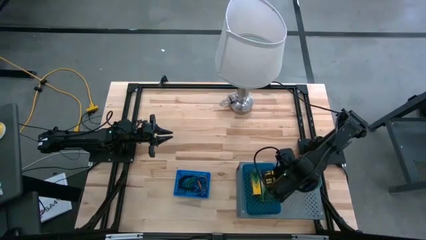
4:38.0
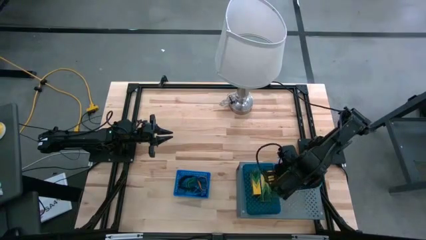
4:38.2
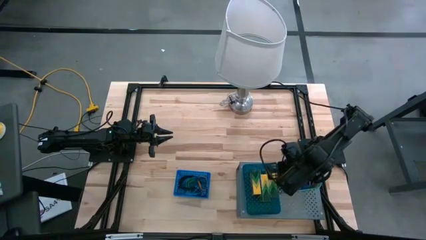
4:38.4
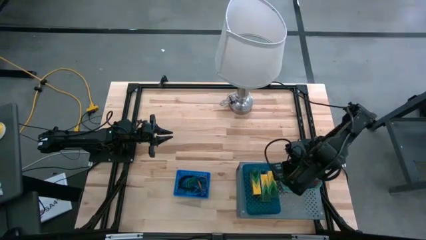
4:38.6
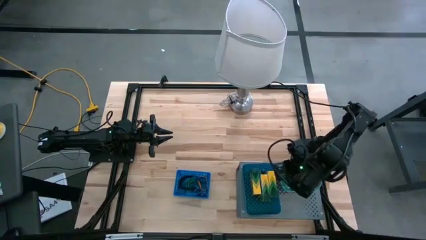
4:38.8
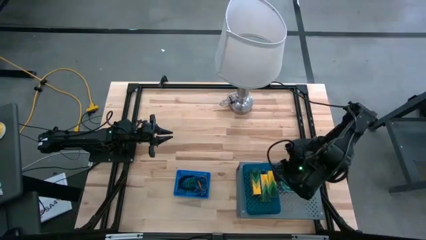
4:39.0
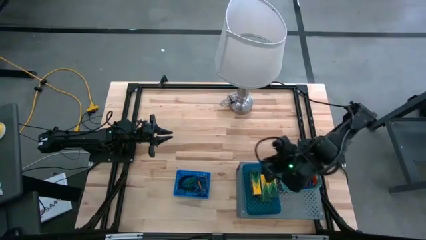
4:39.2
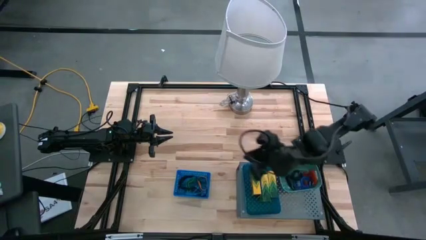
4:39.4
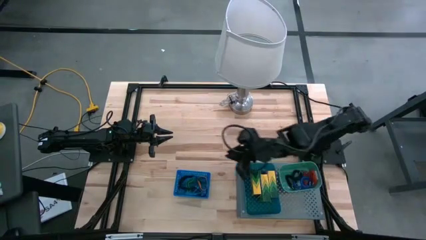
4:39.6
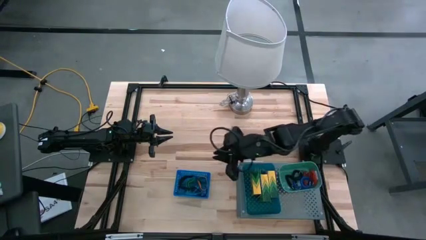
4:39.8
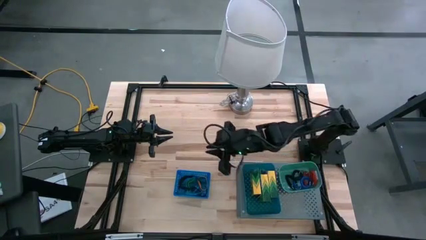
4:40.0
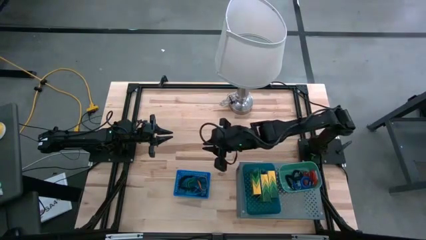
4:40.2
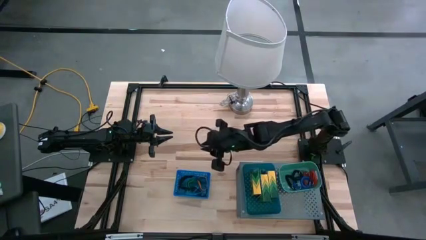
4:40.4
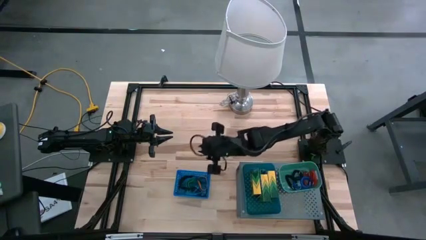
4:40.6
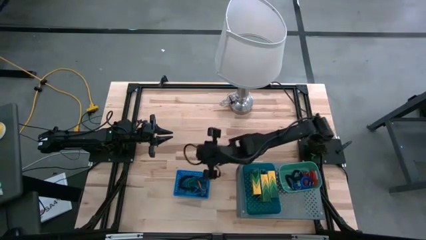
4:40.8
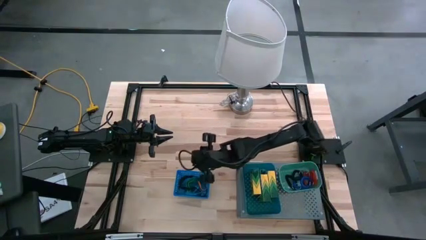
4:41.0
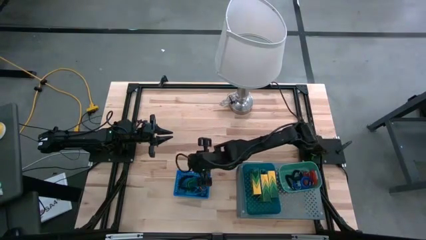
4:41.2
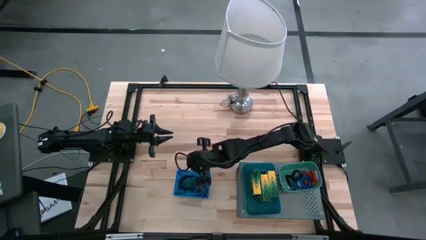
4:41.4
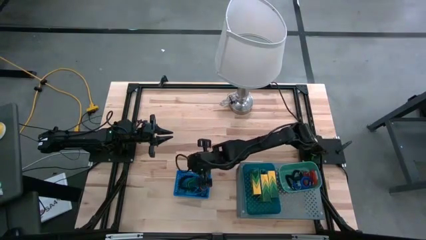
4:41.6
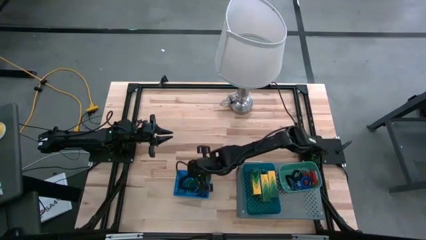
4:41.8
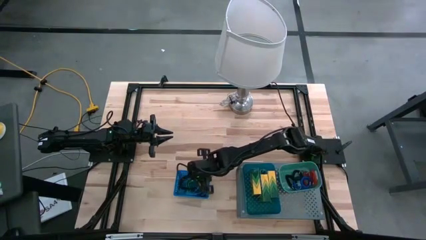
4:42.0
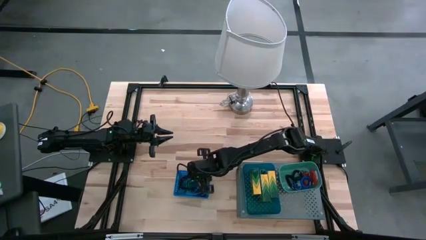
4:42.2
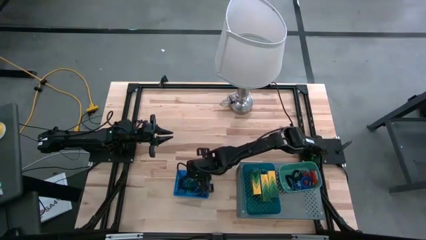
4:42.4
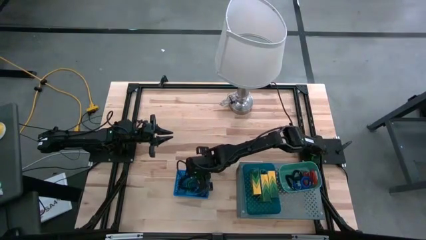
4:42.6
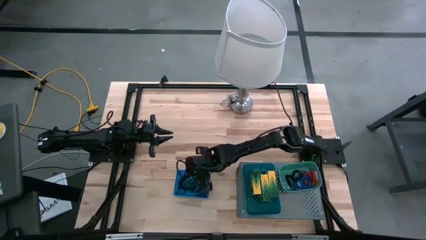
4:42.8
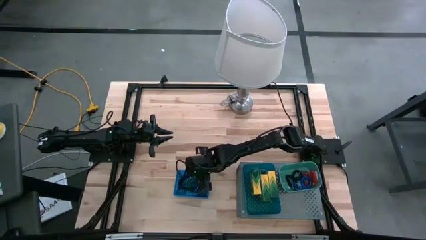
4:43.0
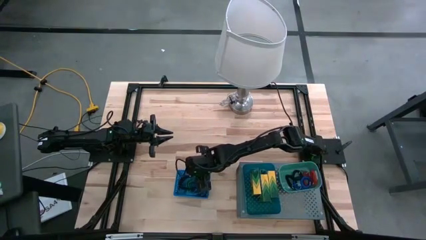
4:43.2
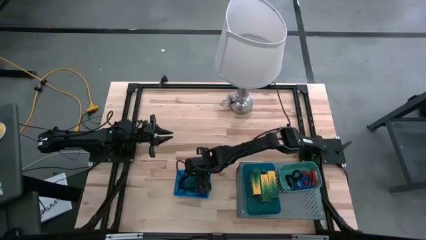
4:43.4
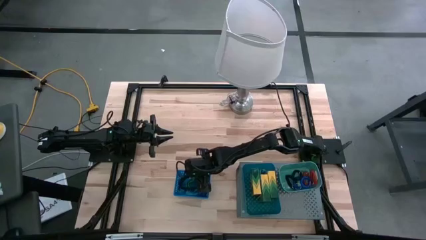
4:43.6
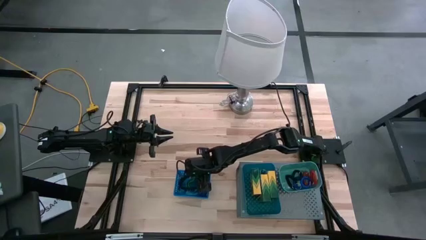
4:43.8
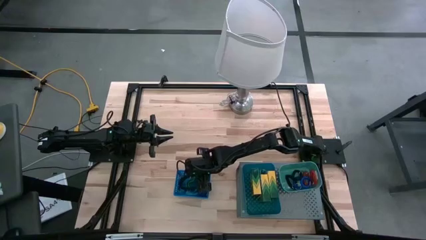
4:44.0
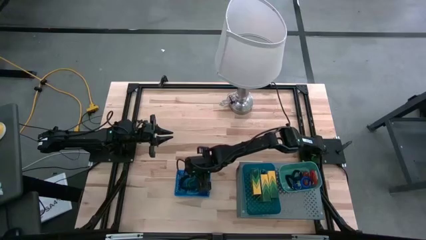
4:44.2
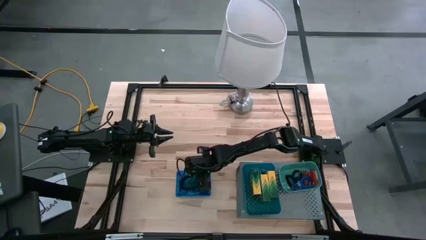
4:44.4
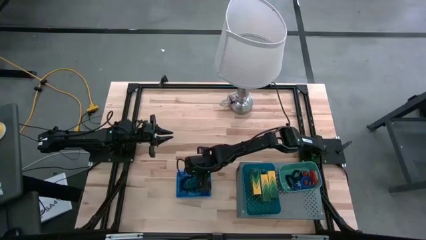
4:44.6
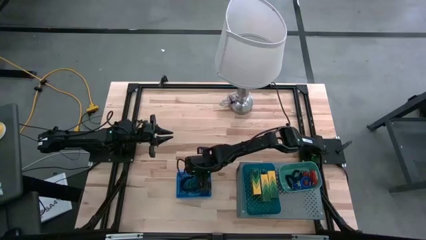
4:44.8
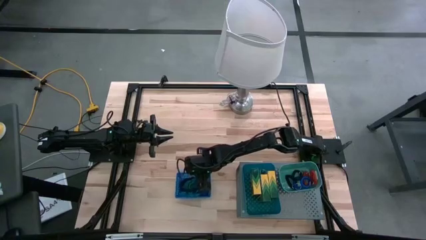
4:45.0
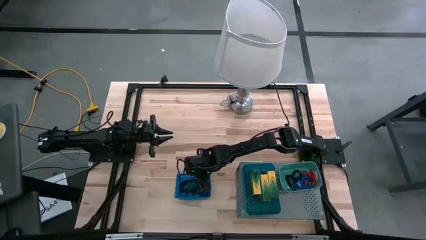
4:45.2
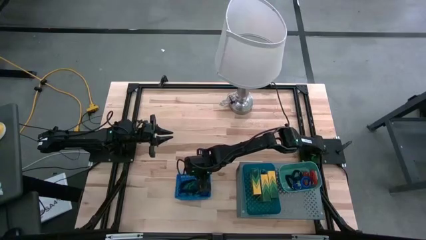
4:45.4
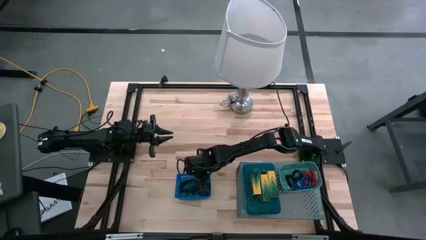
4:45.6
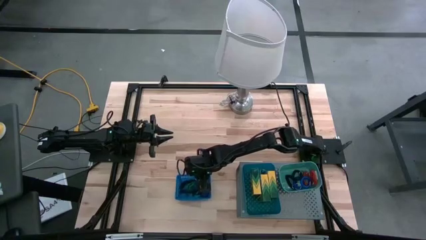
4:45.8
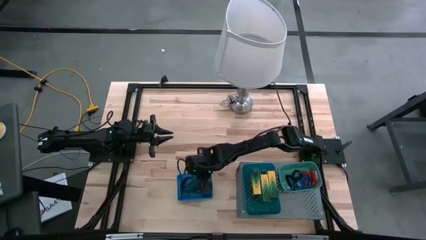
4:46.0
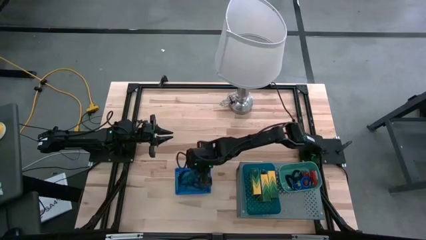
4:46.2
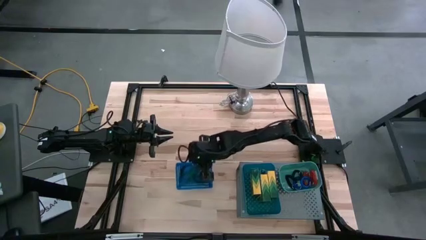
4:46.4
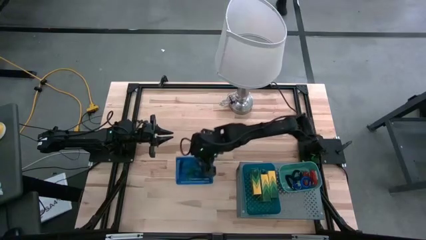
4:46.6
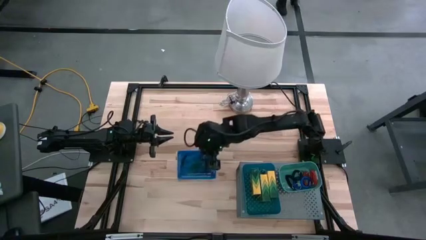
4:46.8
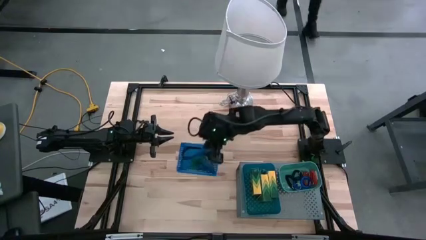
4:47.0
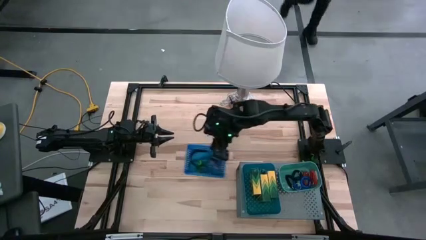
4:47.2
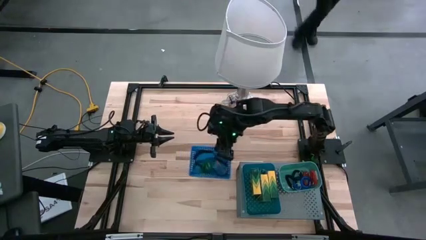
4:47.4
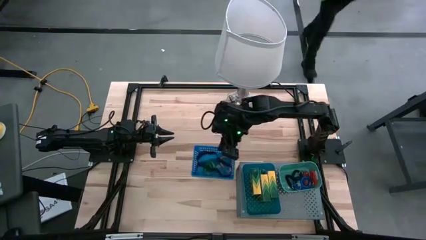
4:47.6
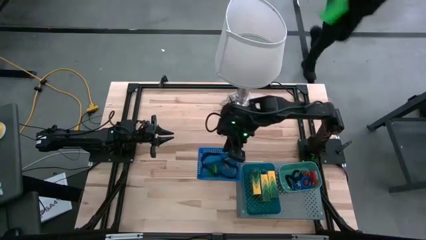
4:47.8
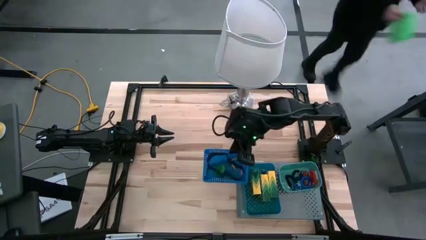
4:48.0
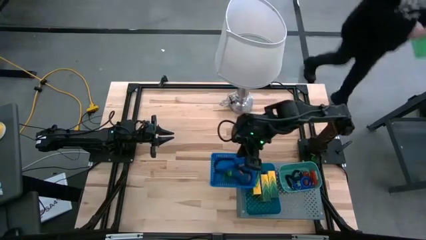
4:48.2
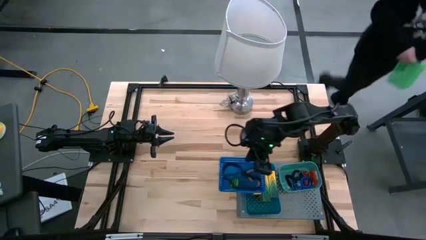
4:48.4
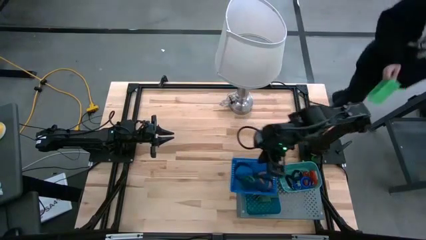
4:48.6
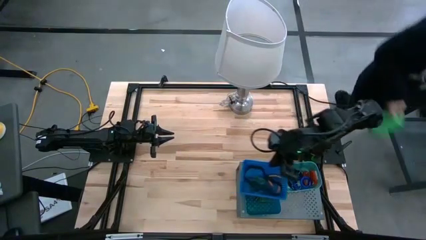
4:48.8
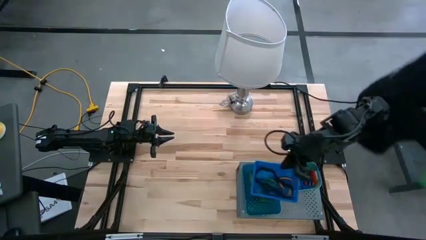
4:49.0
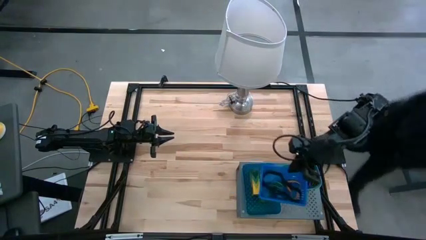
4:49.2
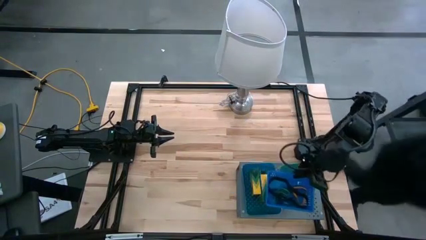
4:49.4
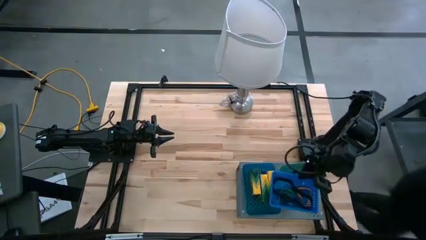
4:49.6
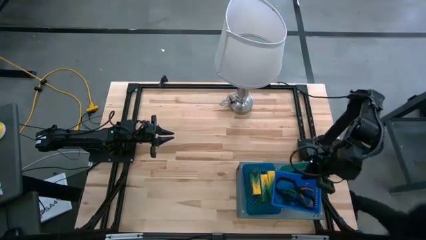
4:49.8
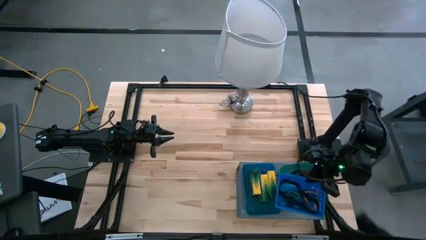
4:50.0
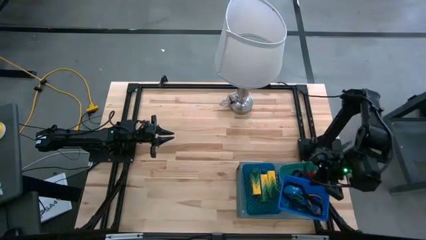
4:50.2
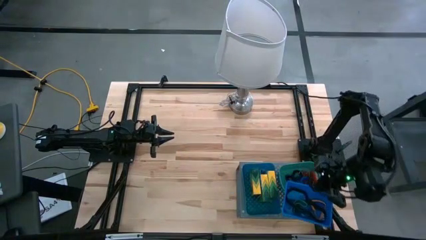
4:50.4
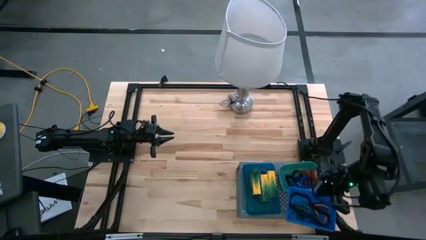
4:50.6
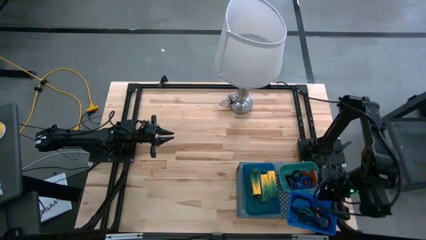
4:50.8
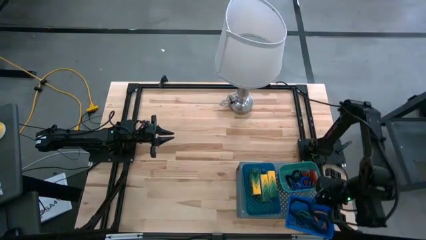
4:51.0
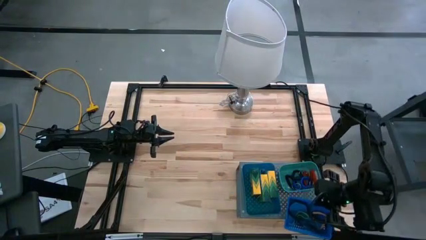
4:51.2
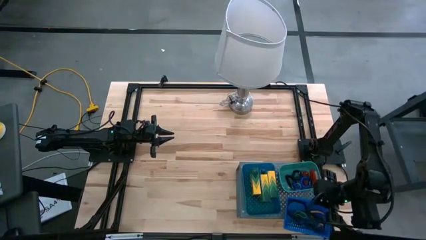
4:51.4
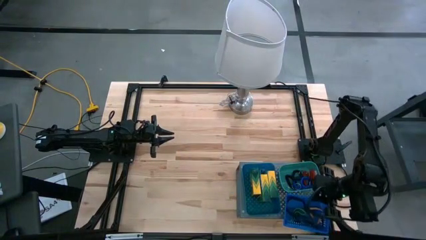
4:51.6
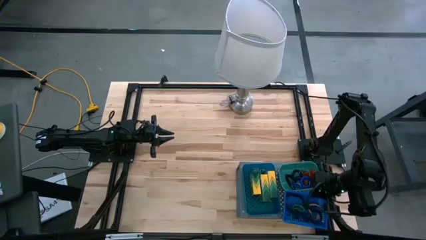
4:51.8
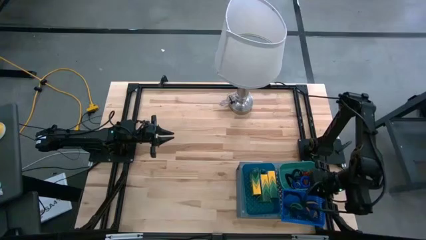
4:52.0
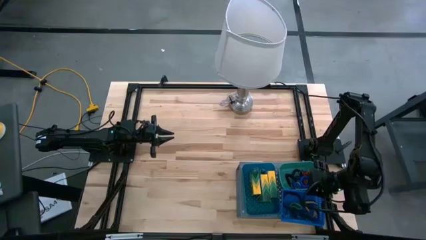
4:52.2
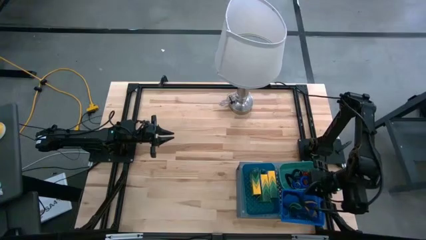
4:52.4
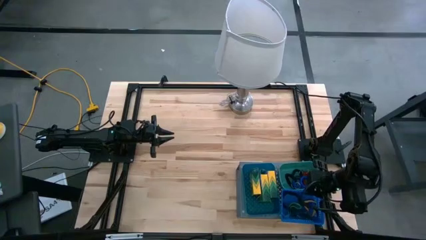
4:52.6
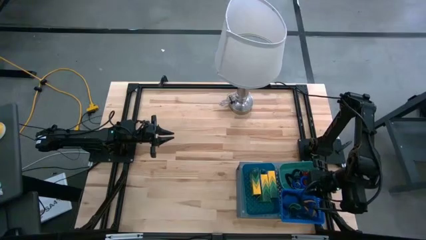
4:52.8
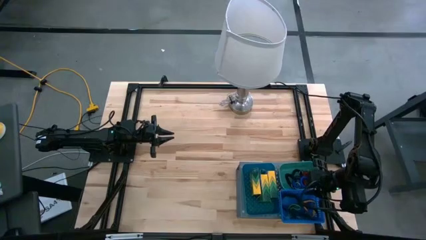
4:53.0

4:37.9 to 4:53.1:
Task: Pick & Place Office Desk Supplies
Put the blue bin on the shelf

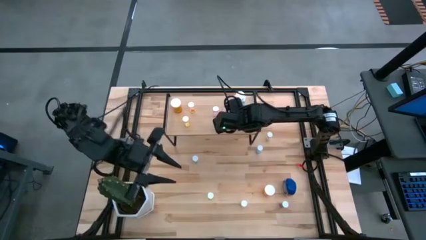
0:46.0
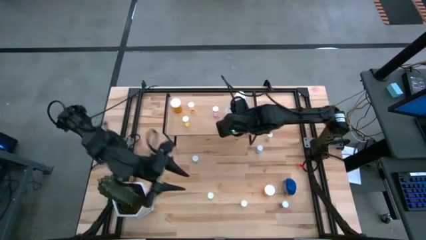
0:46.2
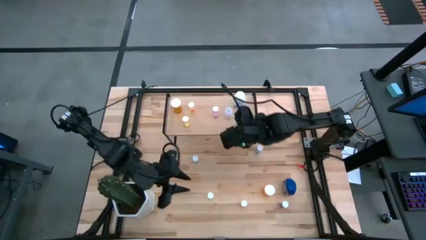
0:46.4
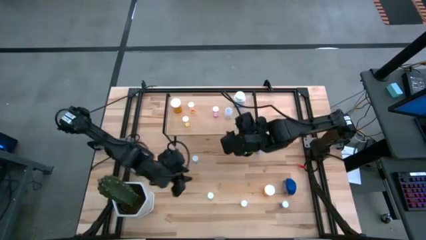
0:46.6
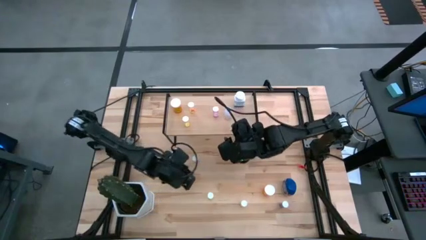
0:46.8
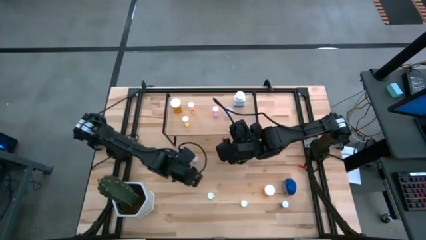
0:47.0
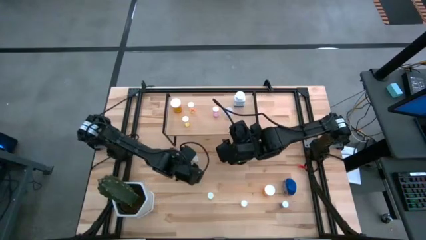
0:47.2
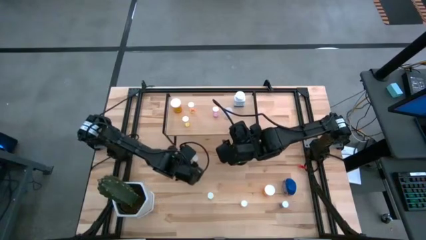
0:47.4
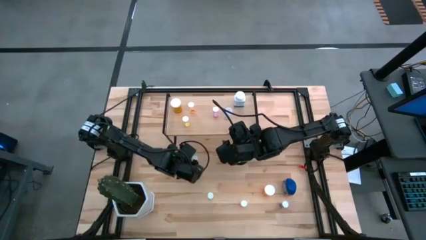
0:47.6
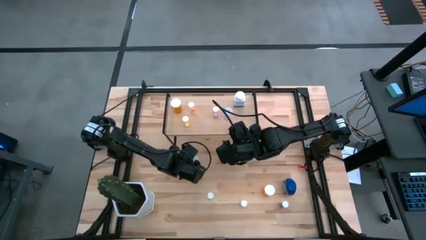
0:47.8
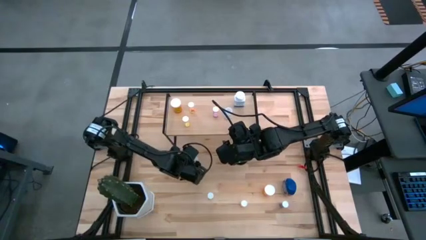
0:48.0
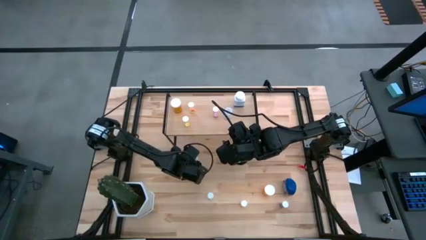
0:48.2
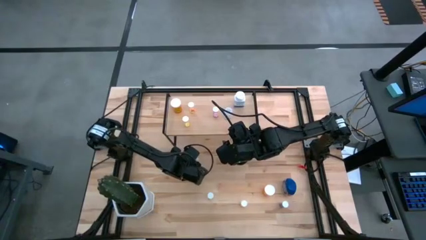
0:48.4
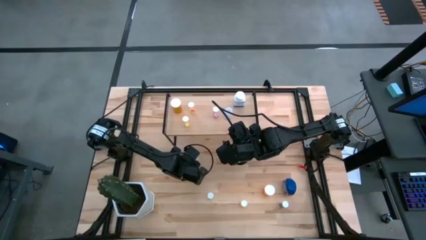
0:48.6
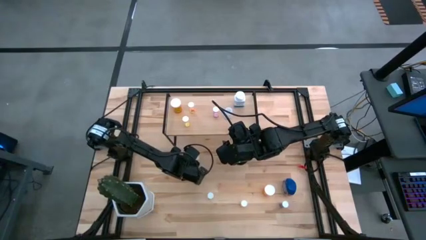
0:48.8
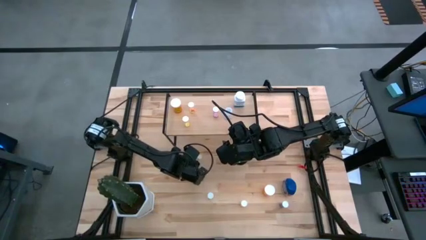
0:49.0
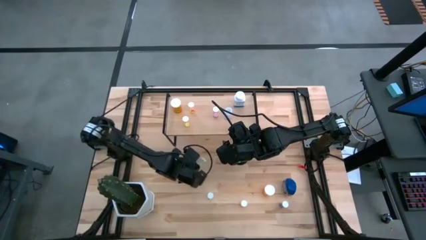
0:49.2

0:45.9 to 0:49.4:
Task: Pick and place medicine bottles onto shelf by color
Put the blue pill bottle on the shelf
